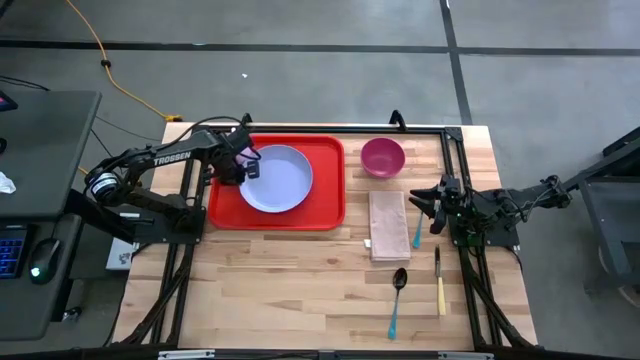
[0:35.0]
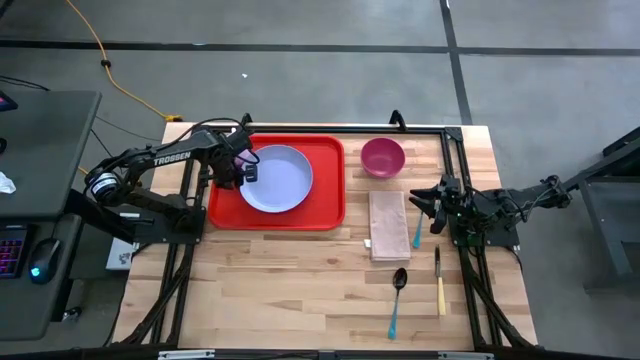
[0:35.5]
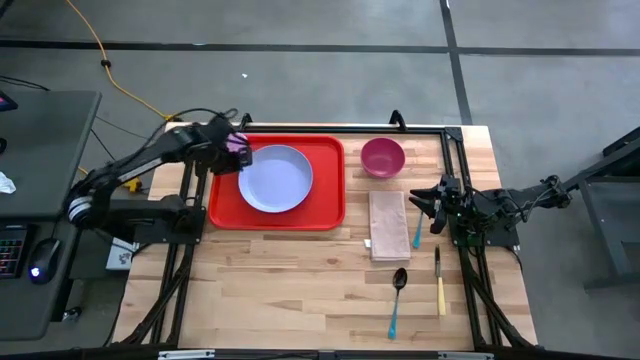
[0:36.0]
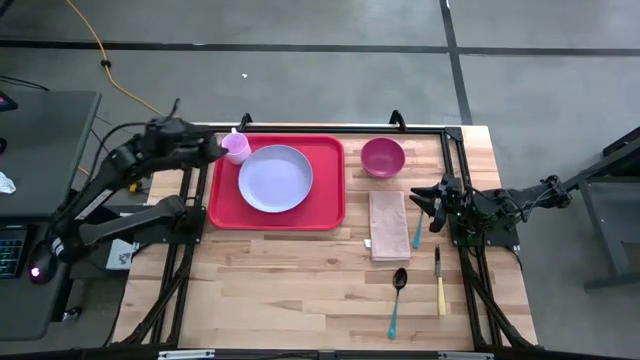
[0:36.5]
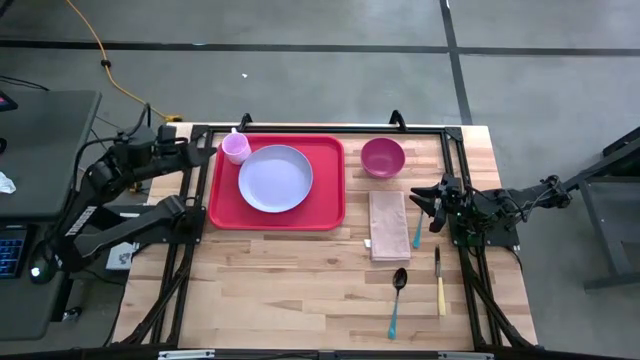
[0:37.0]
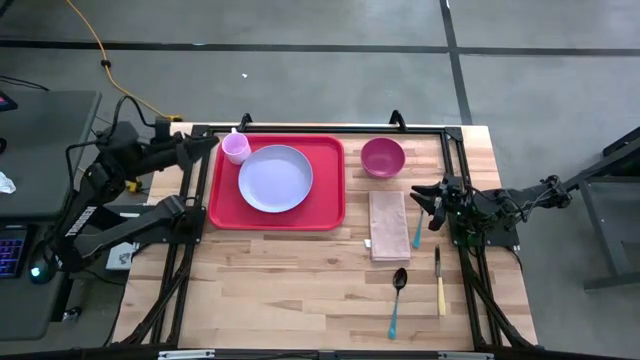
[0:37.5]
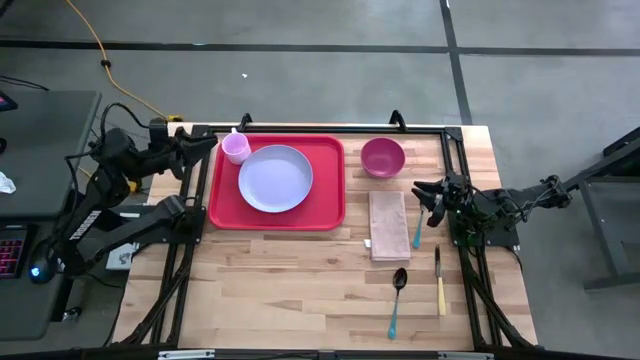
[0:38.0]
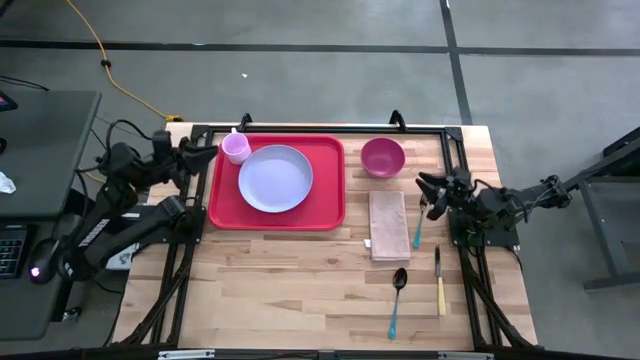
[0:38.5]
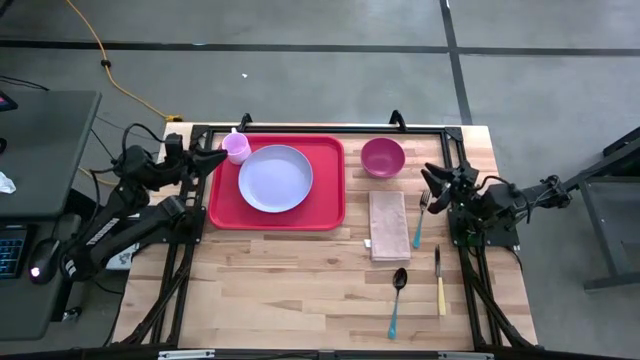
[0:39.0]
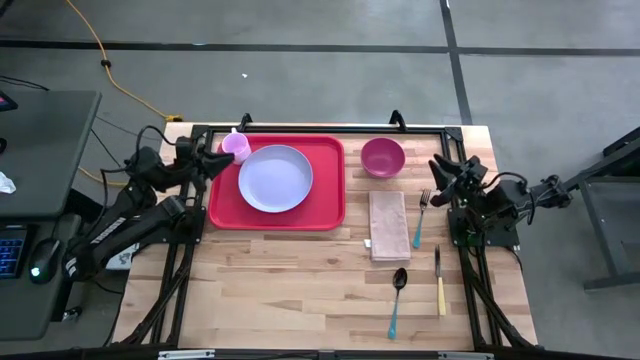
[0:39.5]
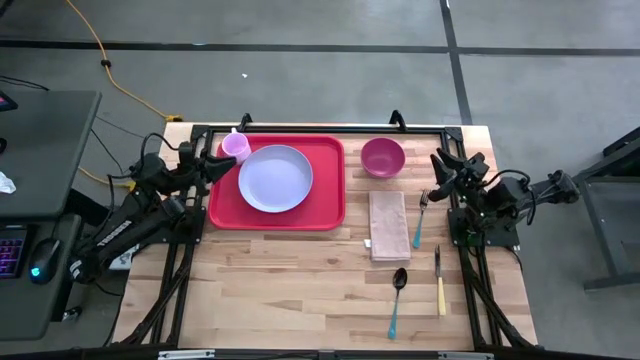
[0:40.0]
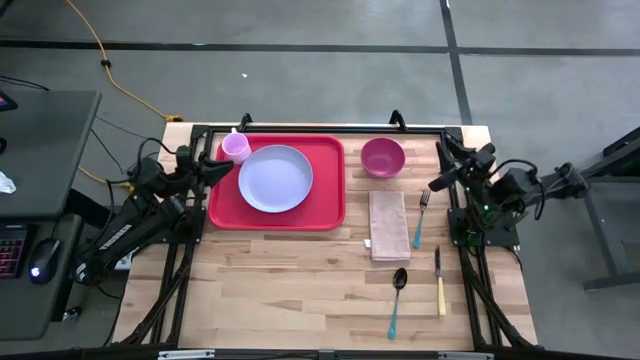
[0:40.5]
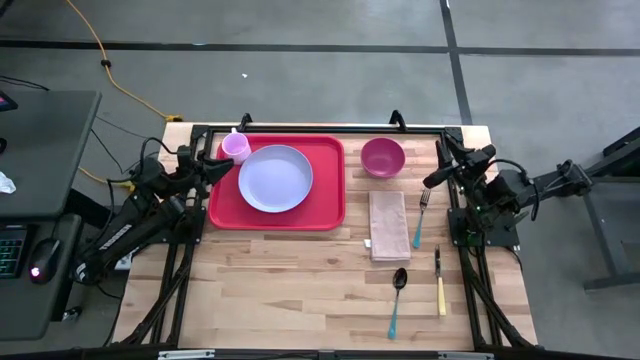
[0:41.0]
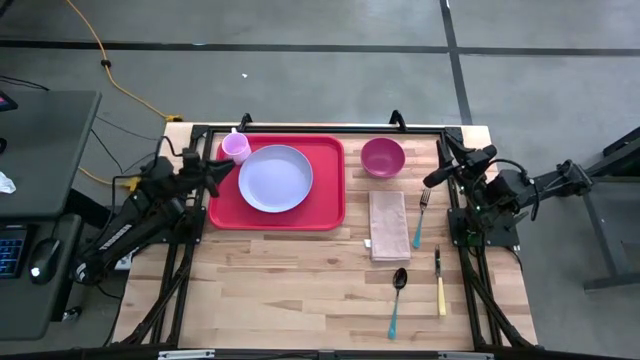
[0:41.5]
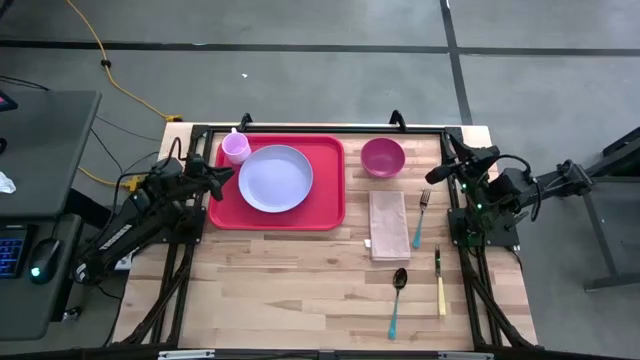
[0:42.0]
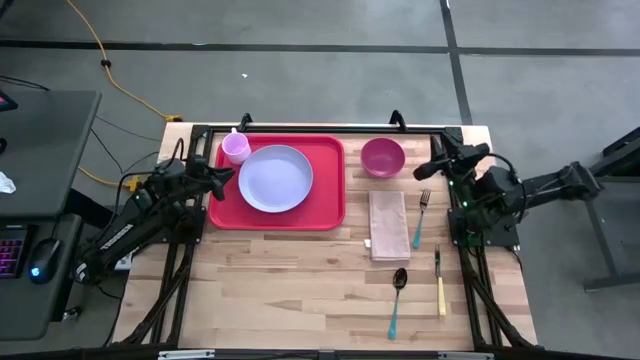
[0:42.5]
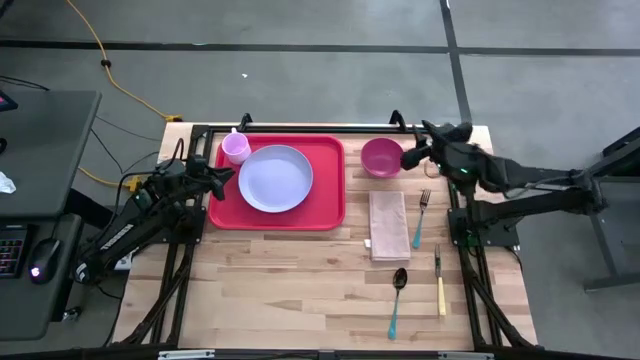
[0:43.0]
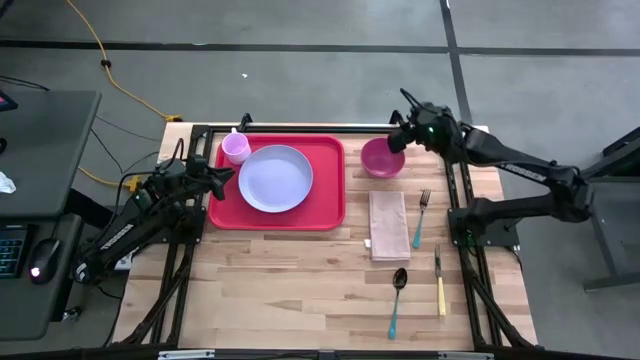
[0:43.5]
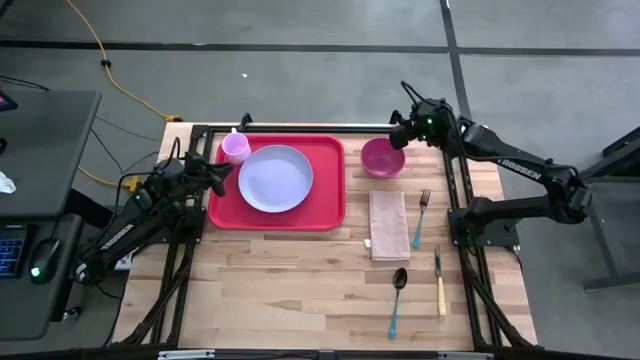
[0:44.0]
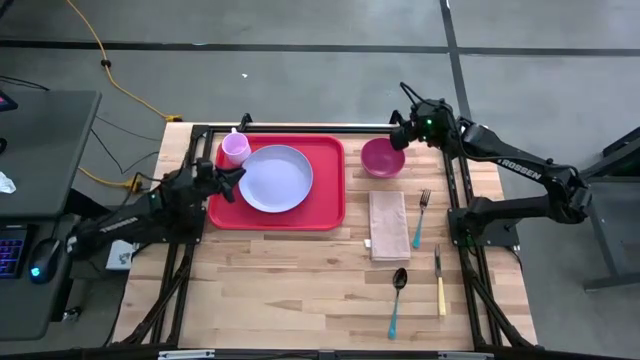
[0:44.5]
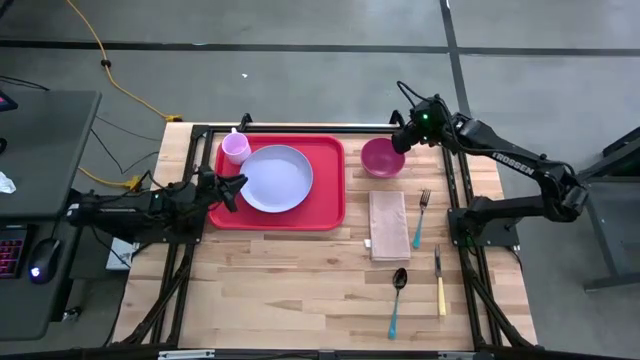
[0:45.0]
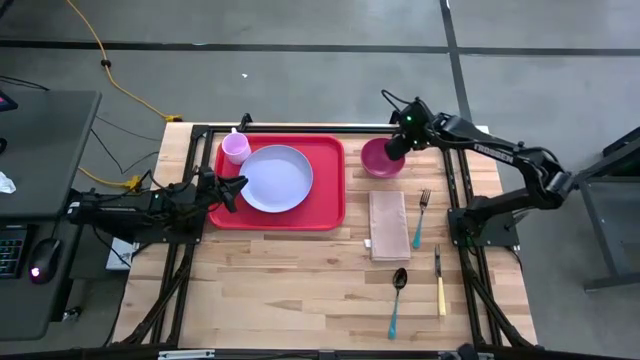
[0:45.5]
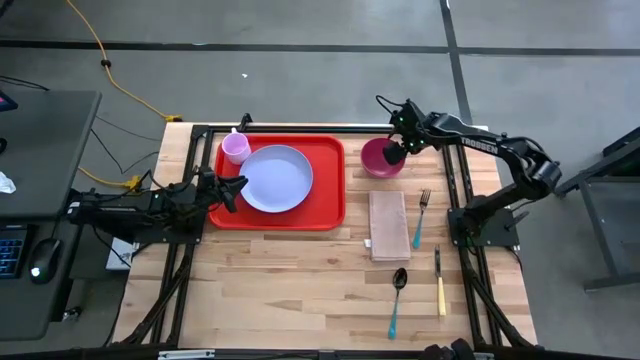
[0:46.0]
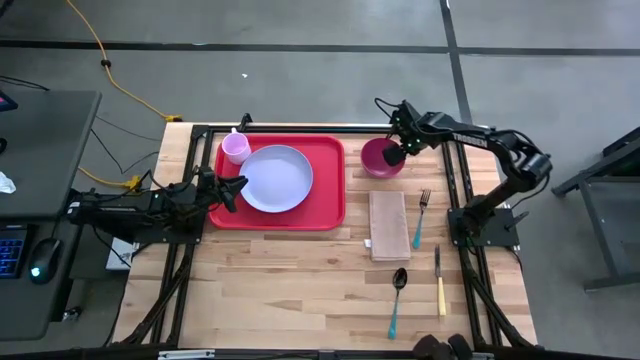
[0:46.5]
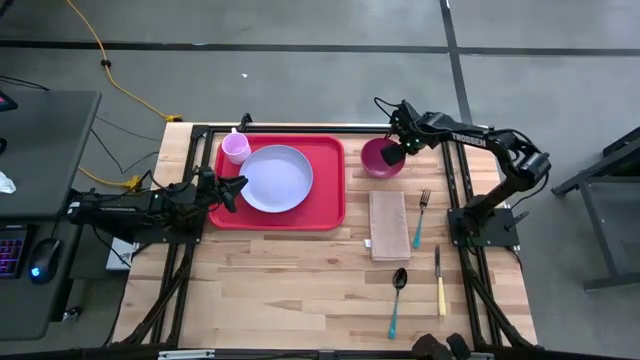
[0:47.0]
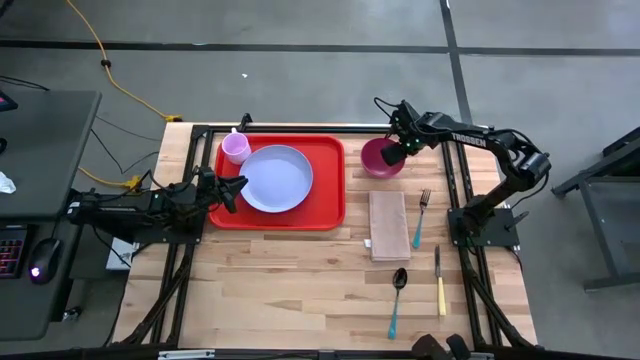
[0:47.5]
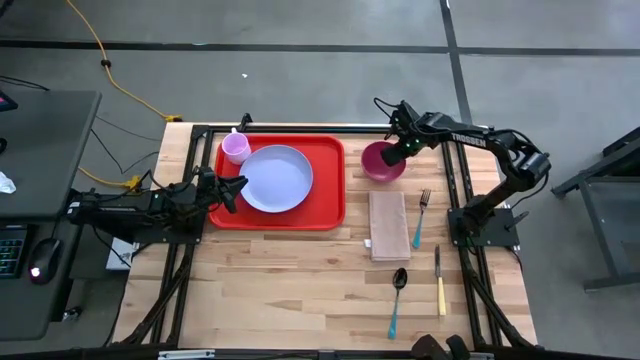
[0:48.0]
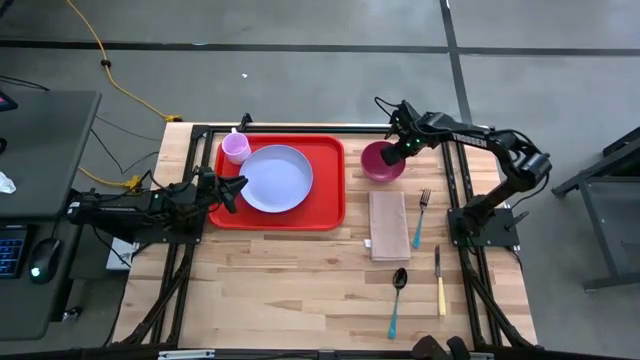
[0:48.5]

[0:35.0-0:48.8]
Task: Set up tray
Put the pink bowl on the light purple plate

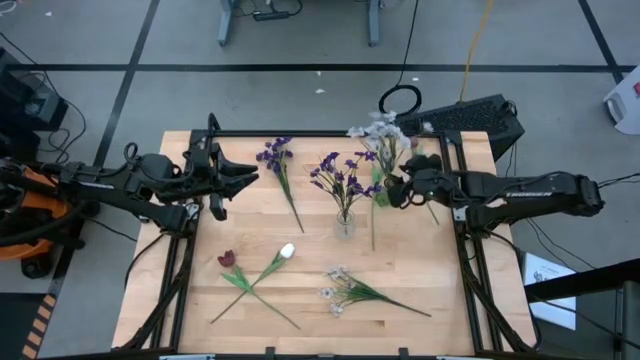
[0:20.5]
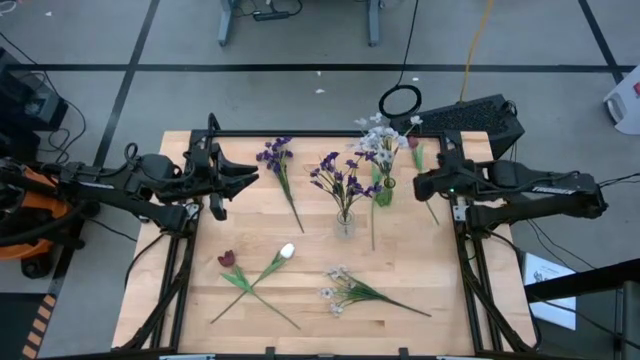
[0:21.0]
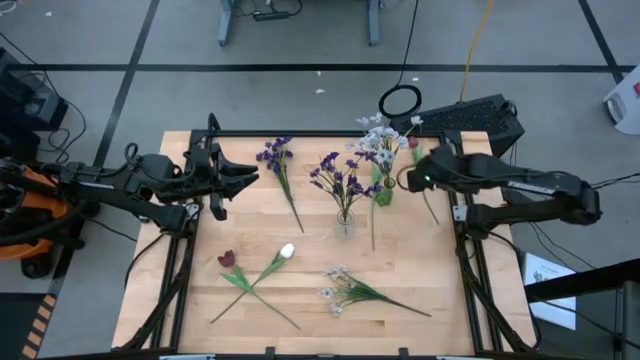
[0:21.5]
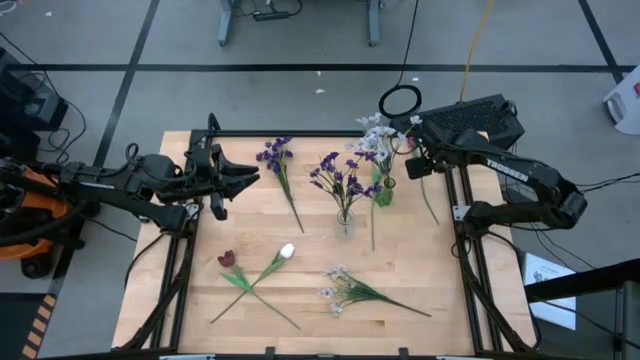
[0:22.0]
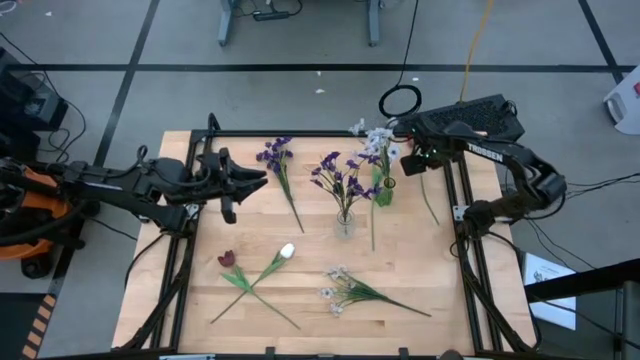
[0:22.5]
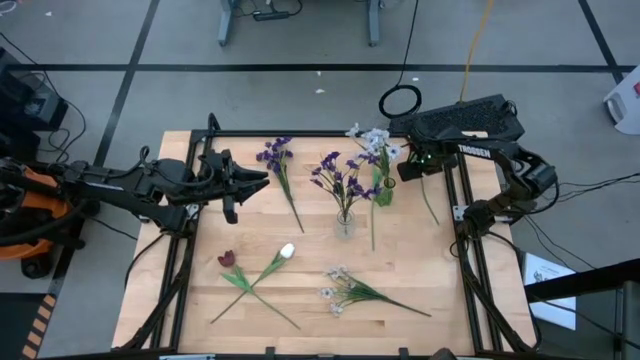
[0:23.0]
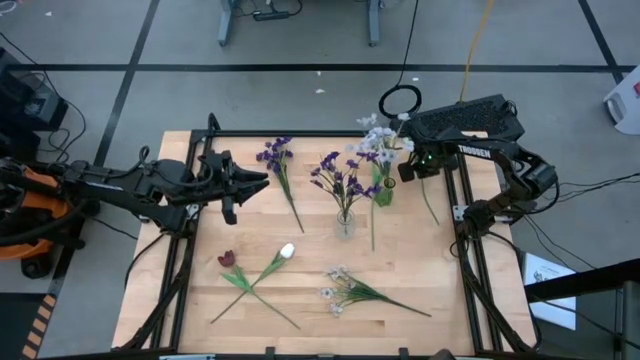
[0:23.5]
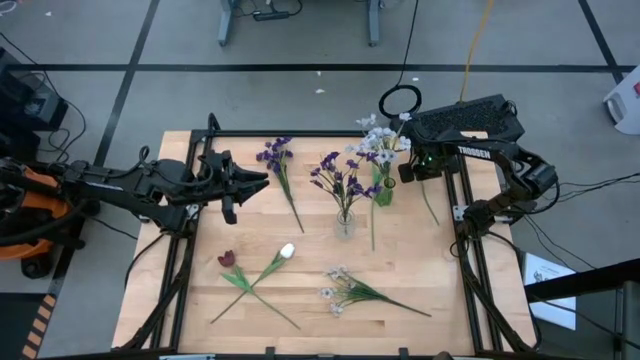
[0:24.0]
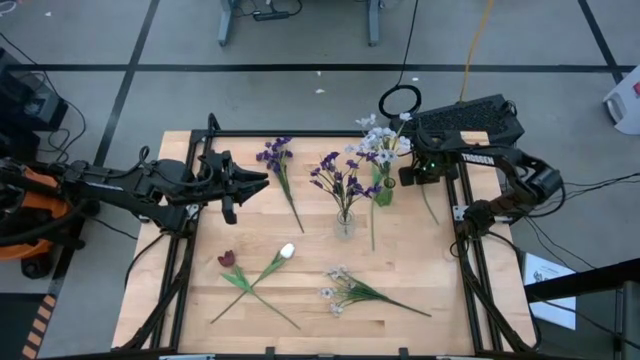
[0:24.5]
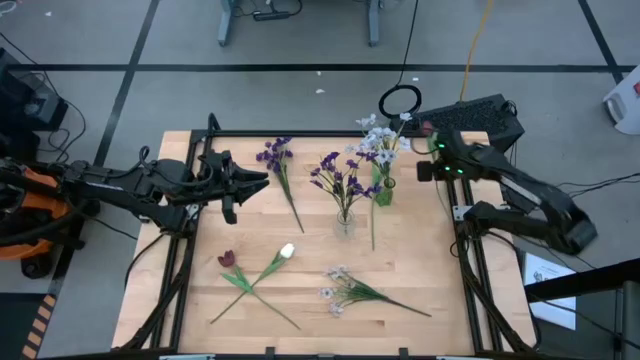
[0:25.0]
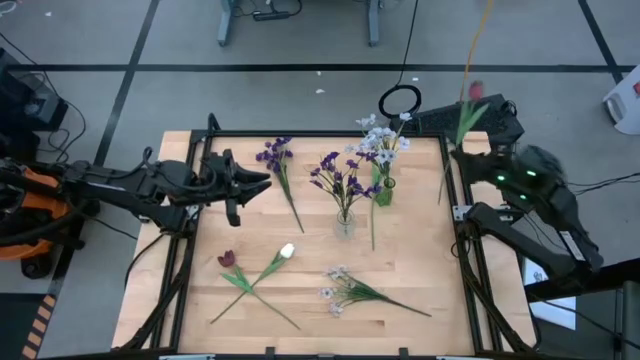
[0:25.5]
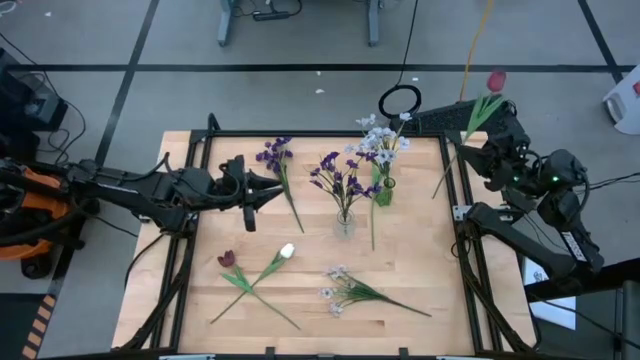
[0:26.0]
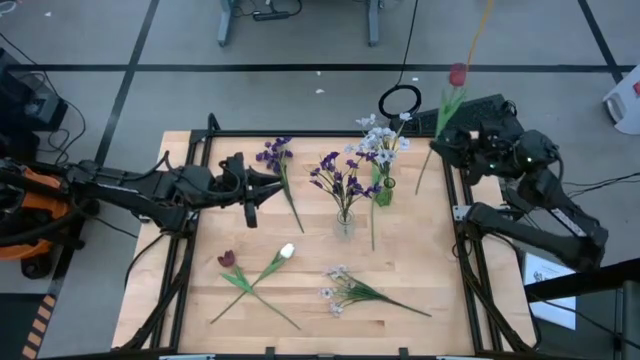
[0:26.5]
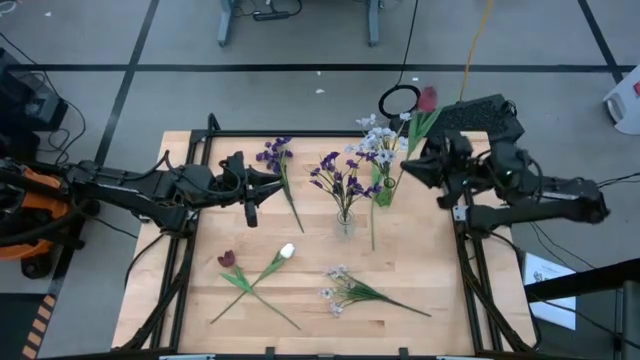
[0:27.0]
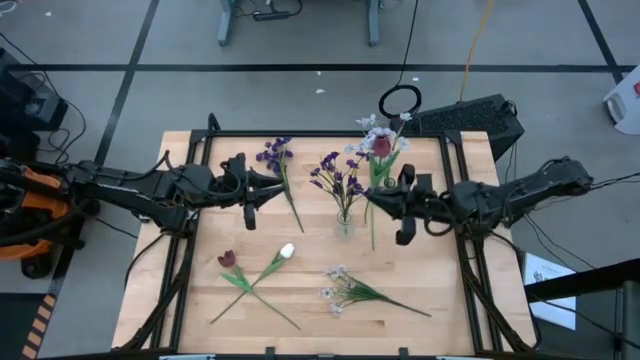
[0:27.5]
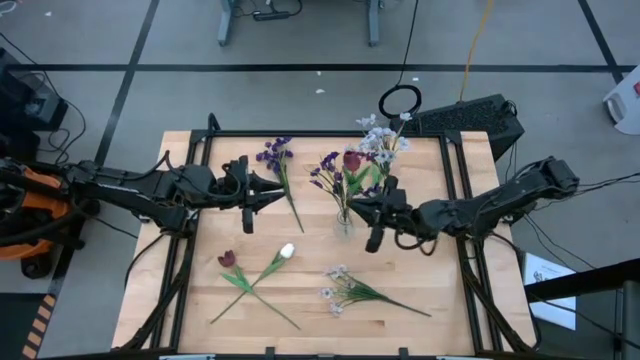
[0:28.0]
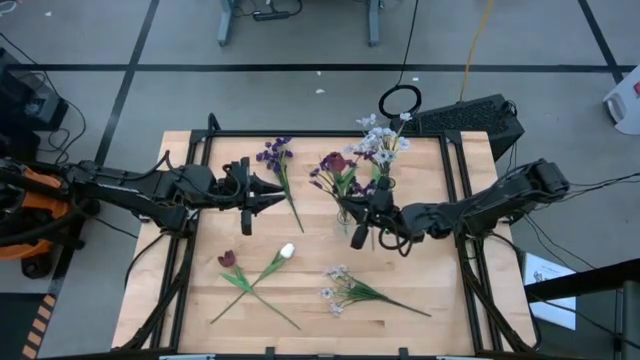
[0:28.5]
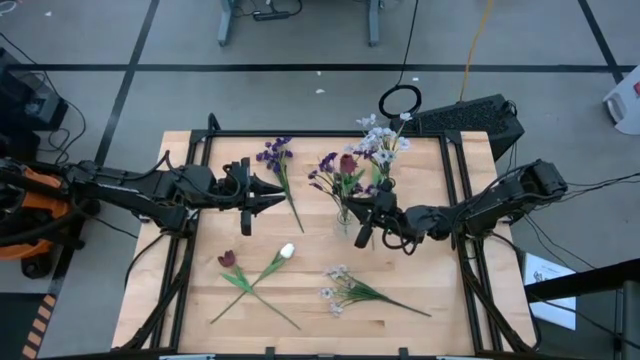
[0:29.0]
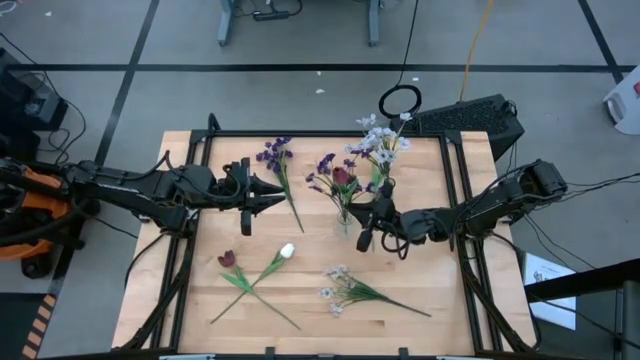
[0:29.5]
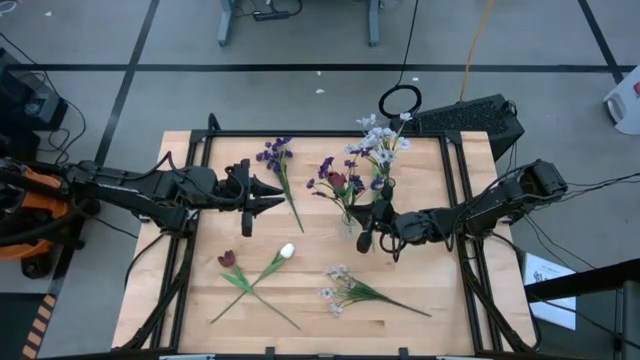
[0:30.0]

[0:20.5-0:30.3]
Task: Sort flowers into vase by color
Put the top red tulip into the transparent vase
